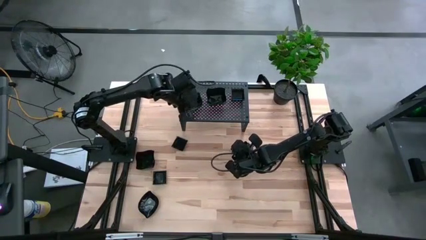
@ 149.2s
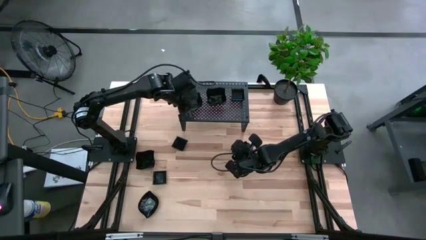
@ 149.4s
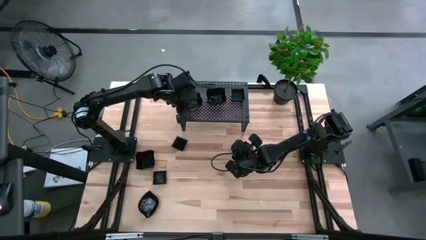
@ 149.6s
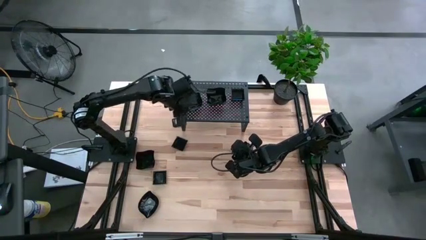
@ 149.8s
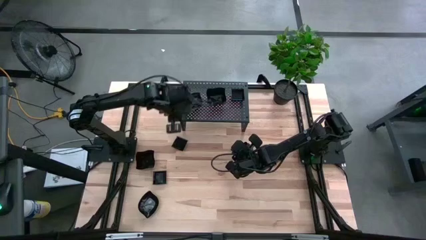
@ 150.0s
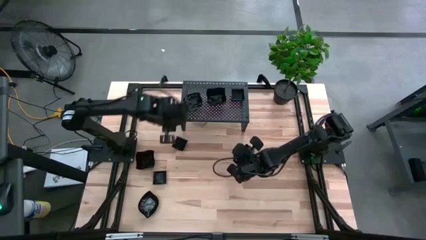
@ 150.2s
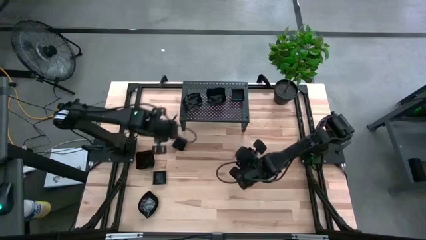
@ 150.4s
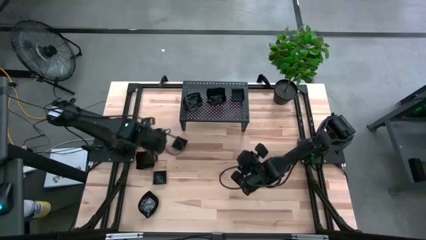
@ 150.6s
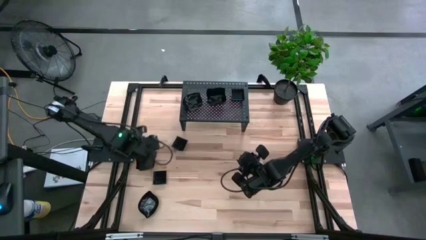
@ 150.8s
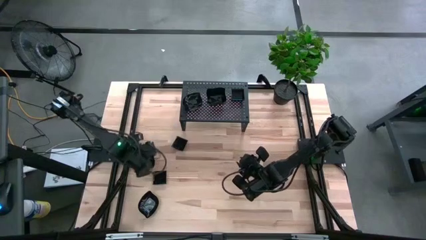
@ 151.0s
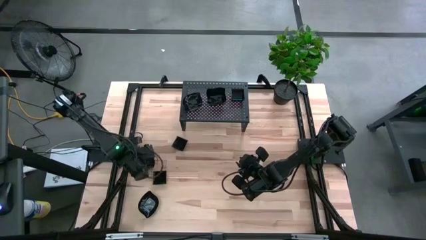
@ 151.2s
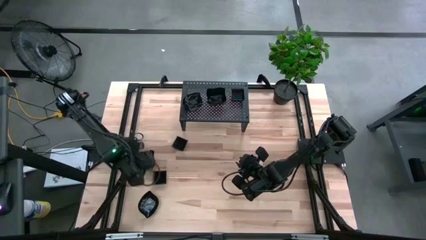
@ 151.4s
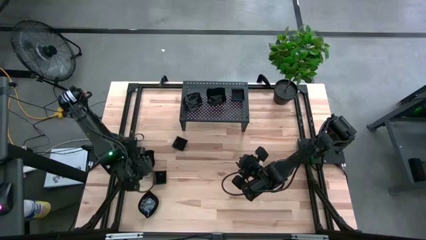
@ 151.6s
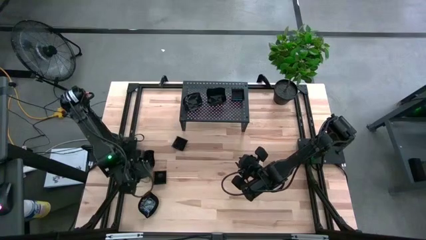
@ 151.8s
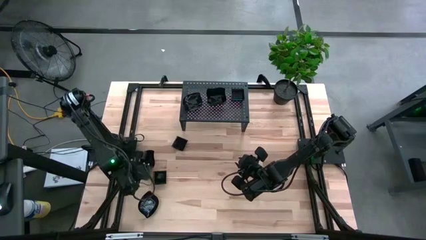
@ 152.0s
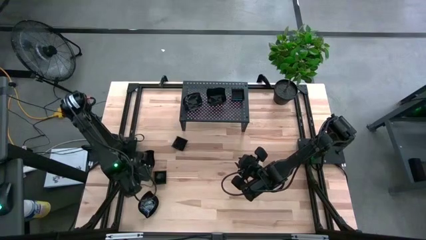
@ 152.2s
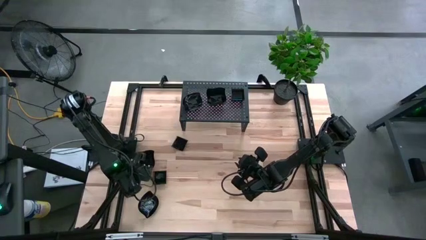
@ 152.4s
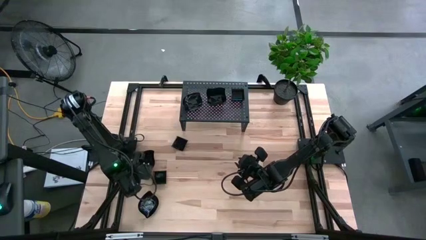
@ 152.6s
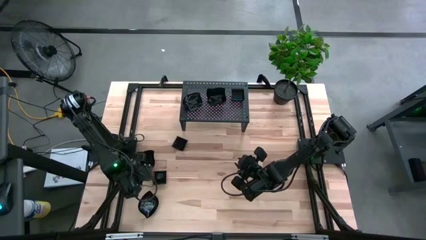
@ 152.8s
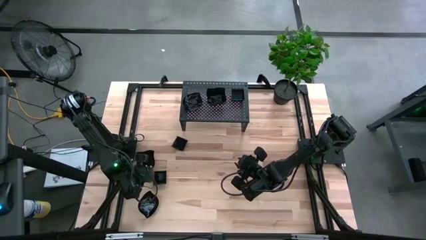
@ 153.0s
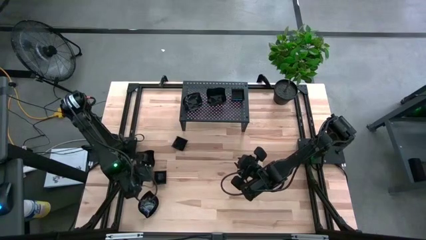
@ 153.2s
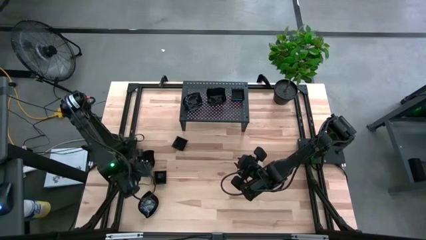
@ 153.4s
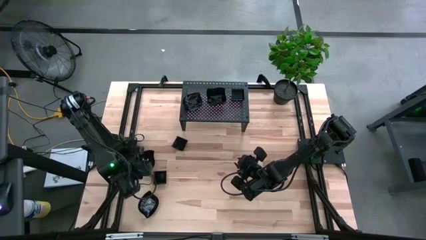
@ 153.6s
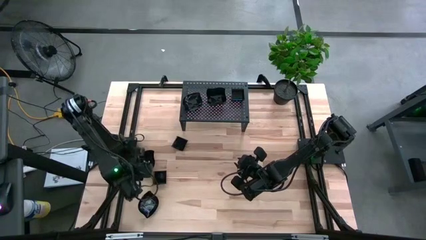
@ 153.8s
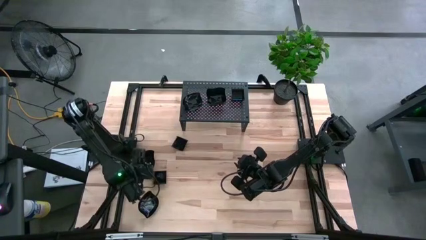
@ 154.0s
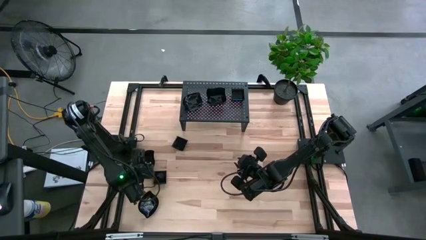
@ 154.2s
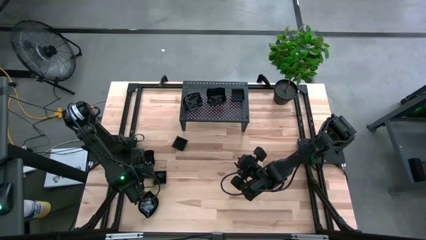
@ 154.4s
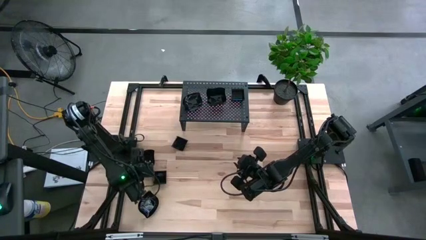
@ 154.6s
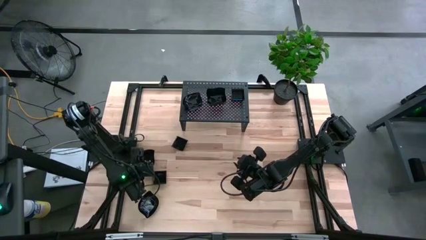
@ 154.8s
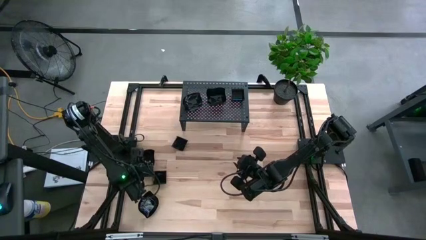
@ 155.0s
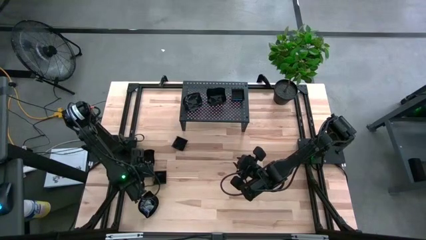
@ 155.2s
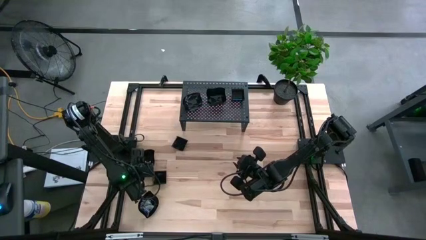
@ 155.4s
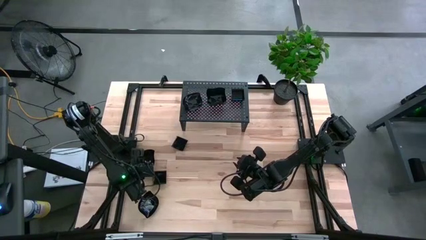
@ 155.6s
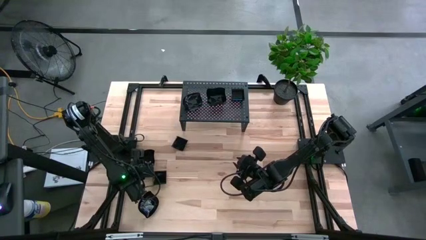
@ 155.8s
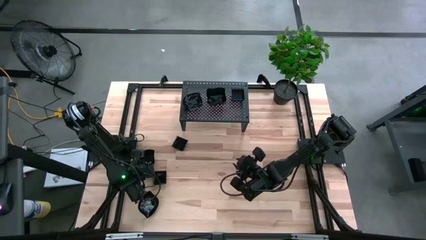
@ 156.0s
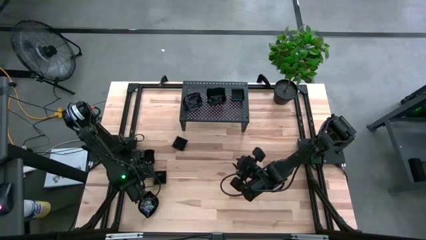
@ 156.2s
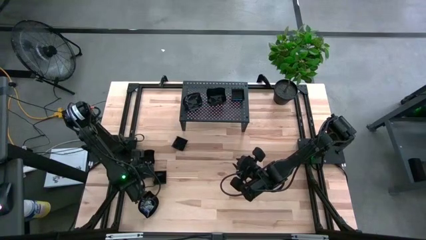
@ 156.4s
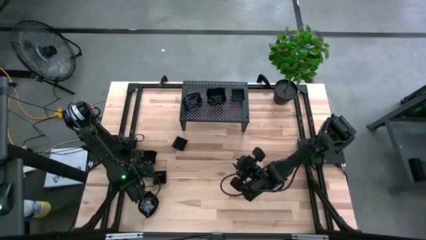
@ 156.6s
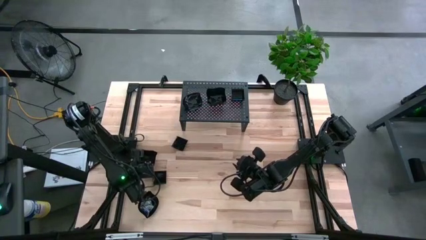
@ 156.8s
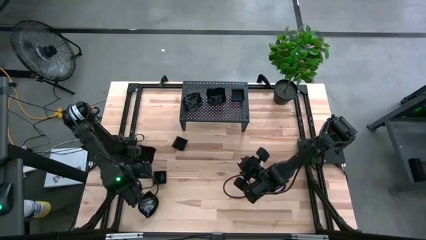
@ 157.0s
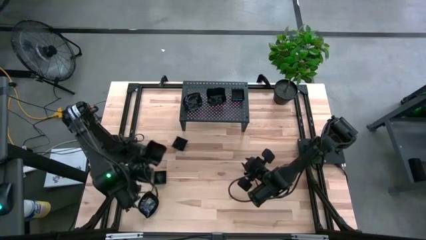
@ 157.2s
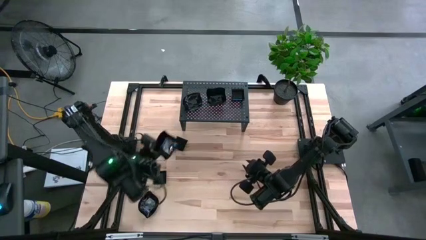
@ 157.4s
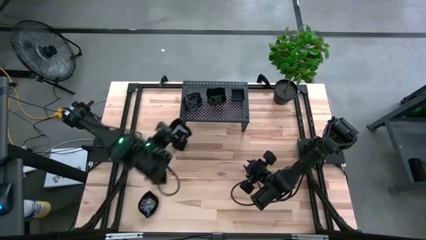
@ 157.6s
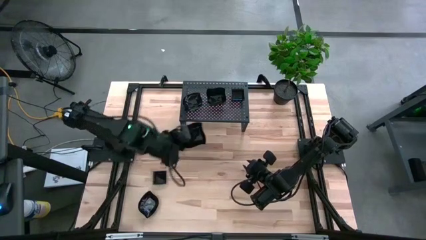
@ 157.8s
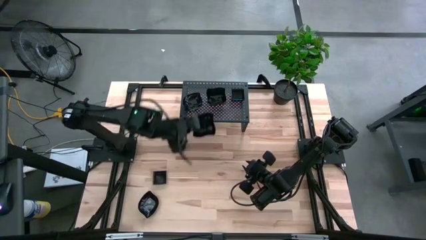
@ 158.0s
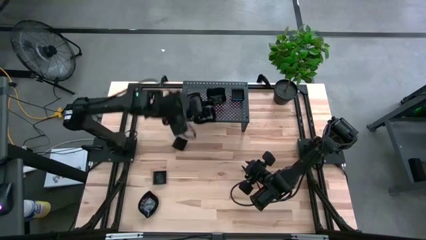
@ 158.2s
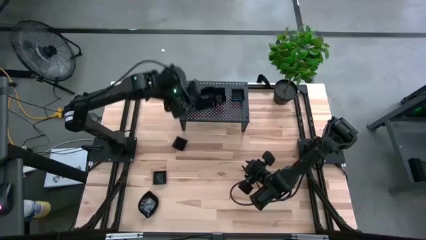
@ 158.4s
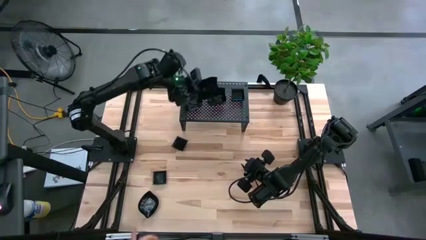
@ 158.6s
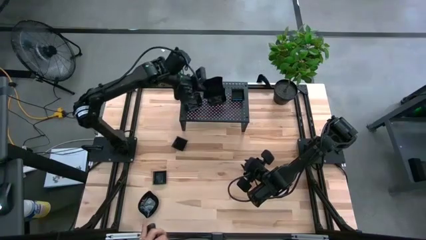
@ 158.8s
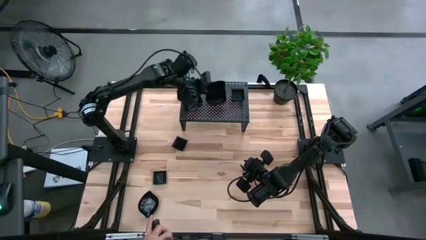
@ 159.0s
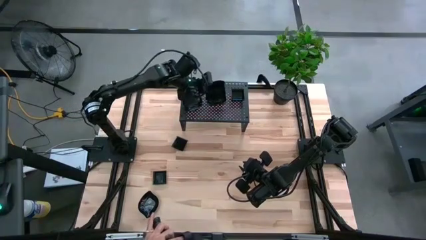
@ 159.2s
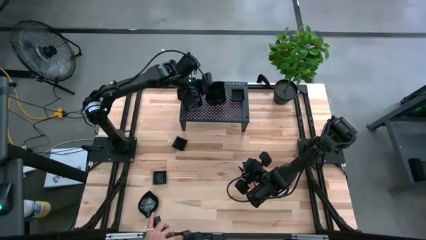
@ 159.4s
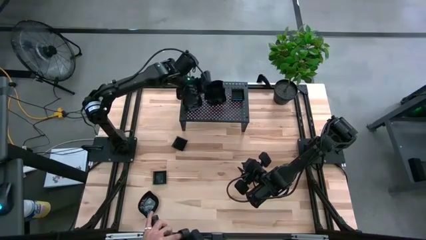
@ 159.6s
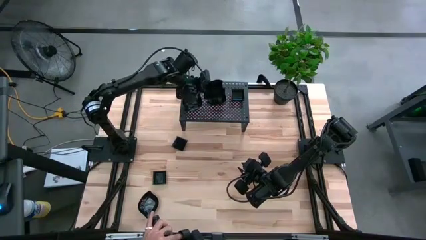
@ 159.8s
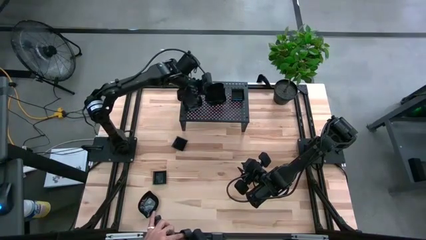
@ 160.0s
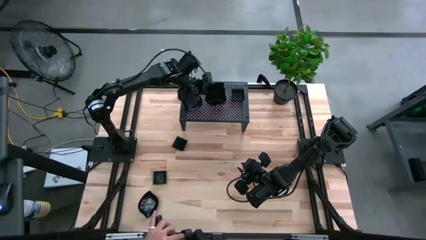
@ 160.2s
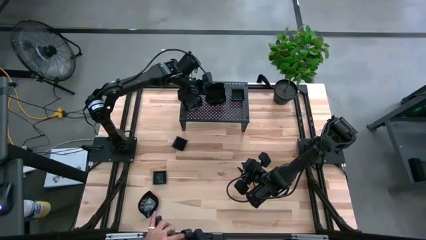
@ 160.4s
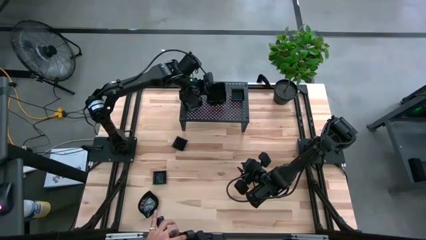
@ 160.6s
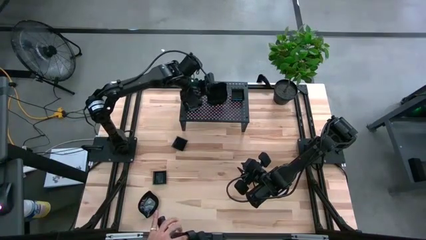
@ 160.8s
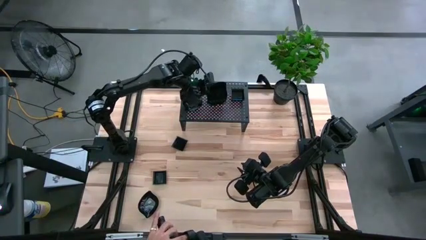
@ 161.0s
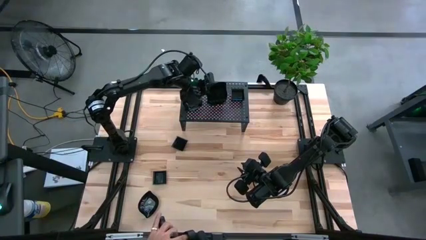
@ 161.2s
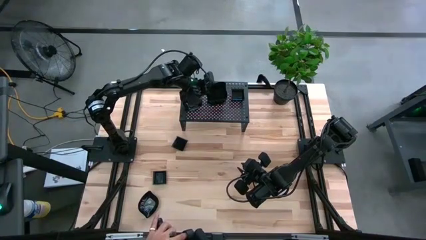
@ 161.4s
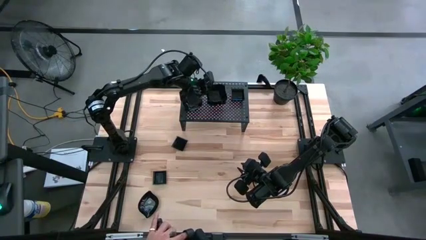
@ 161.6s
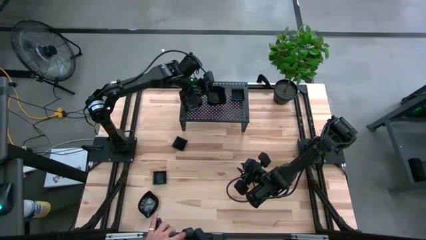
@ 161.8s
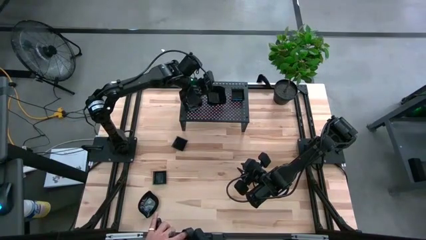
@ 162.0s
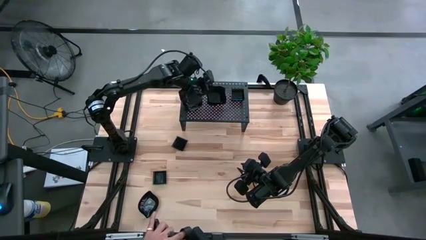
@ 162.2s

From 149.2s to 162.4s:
Task: Pick & Place Mini shaped plates
Stack the distorted square plate on top of the distorted square plate on the shelf
